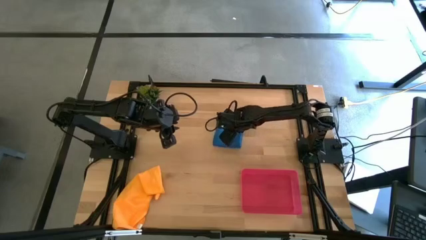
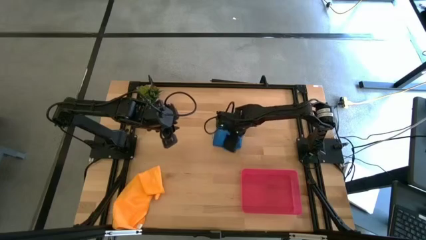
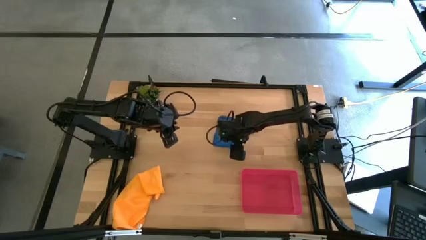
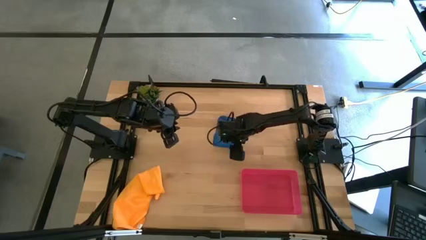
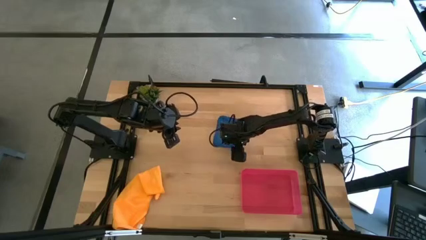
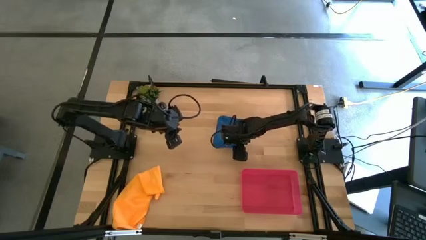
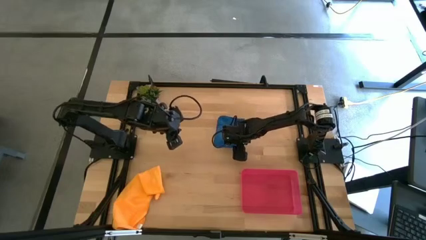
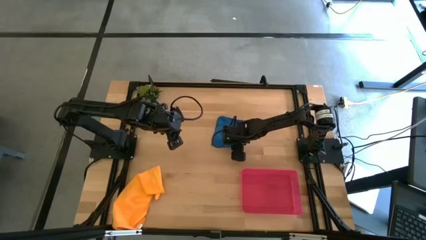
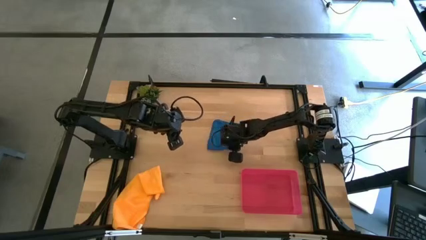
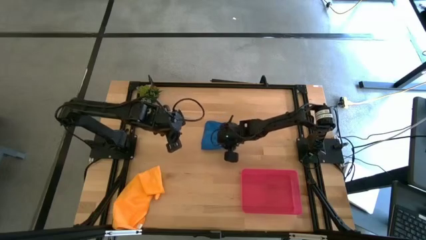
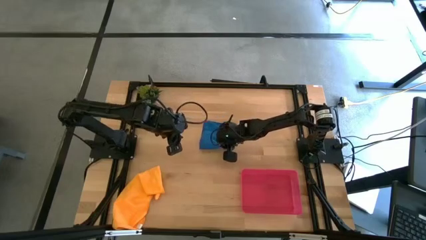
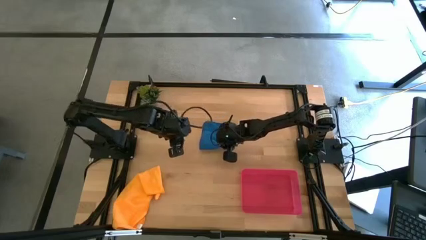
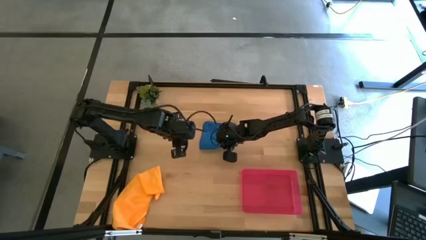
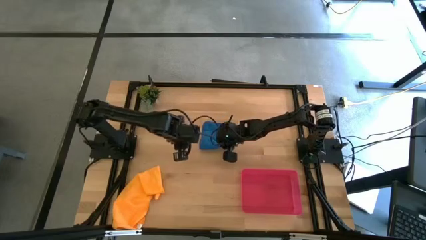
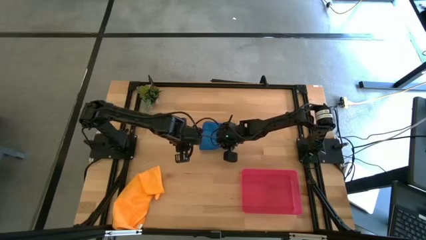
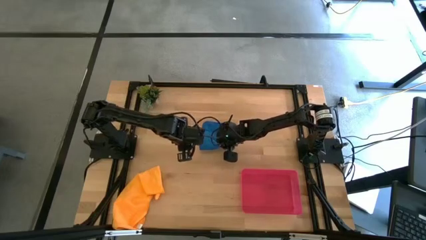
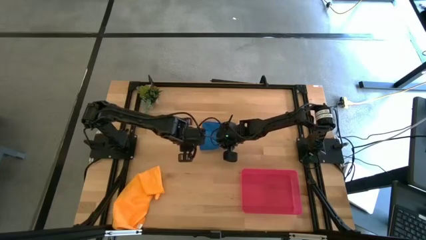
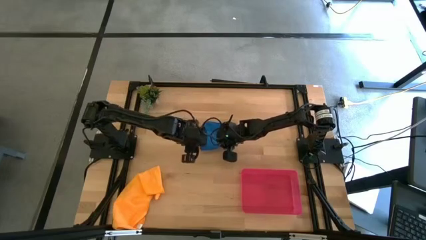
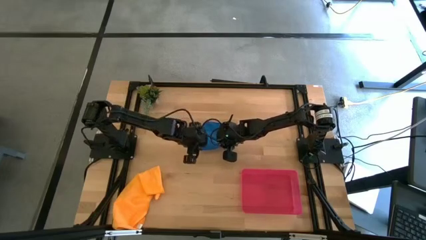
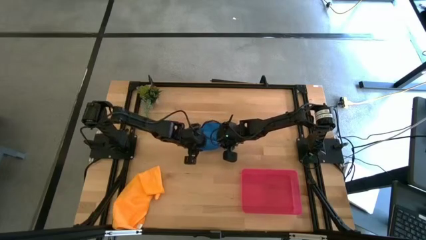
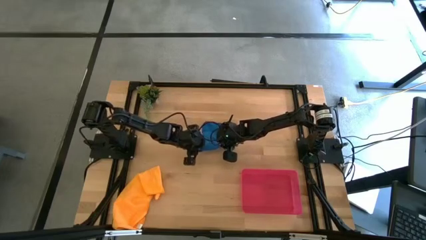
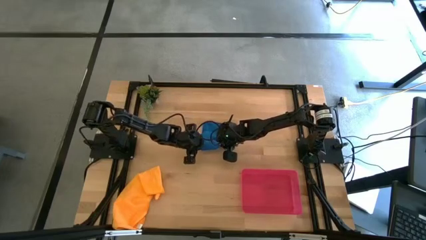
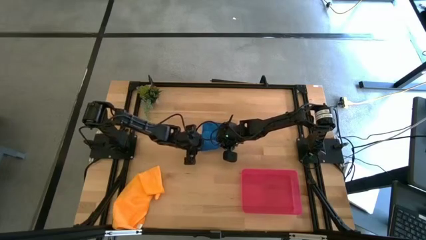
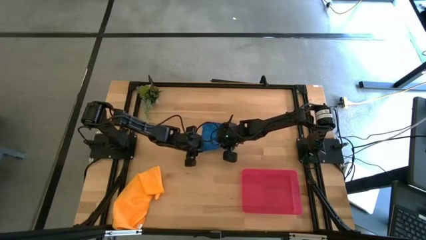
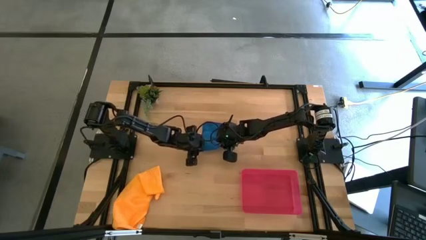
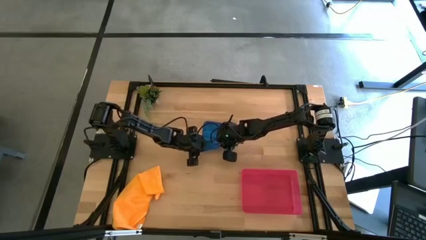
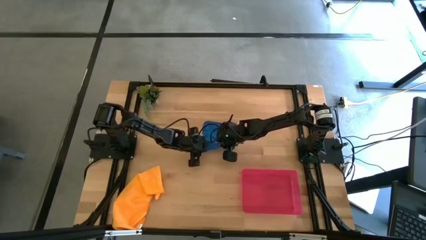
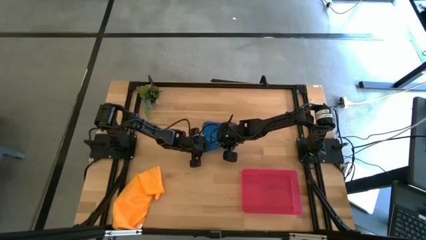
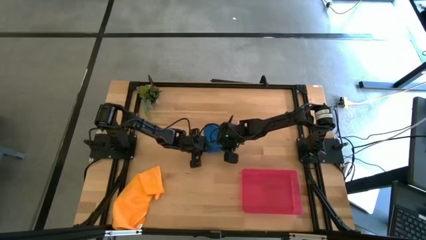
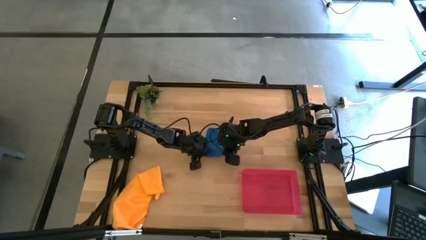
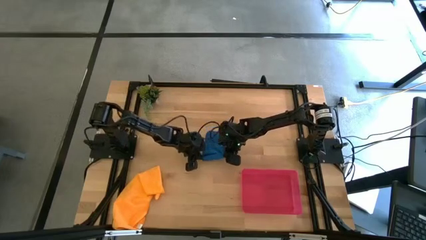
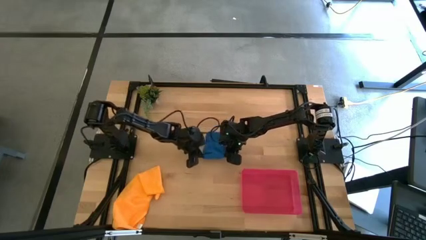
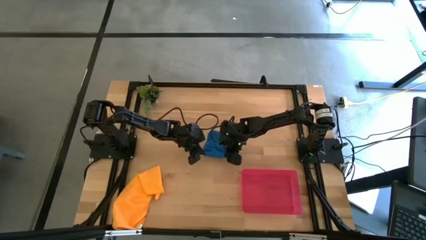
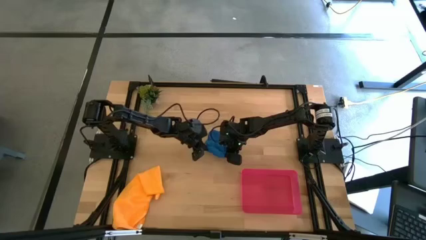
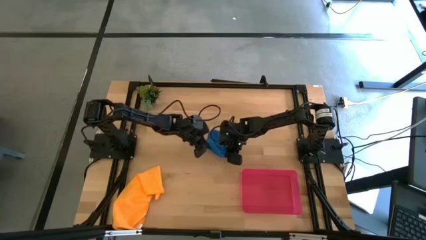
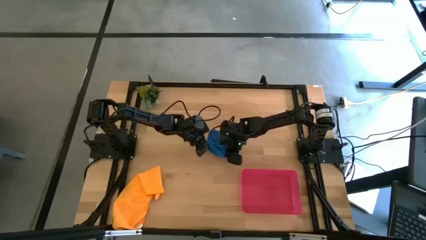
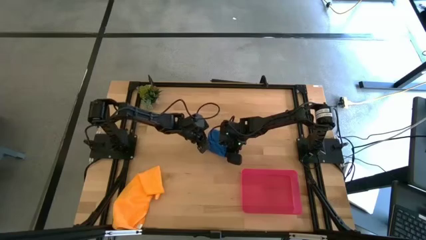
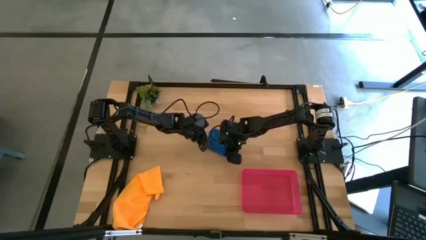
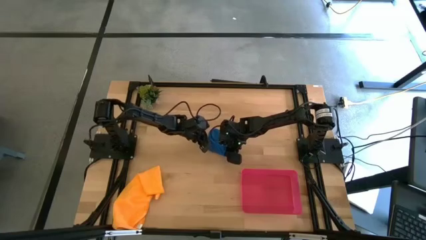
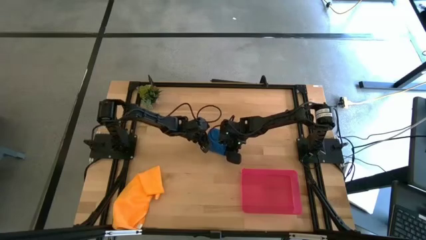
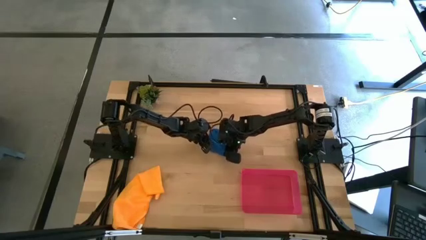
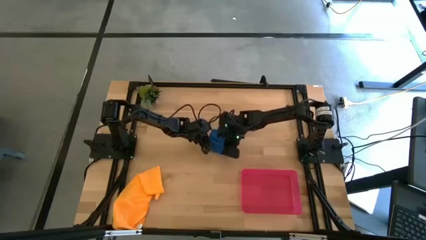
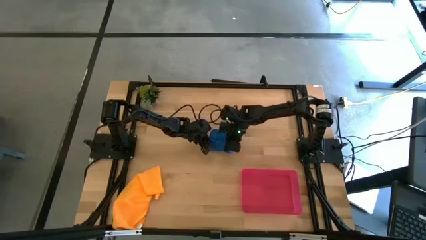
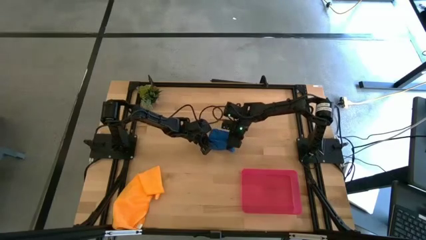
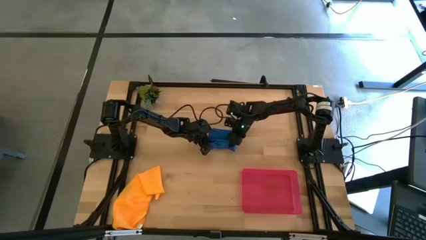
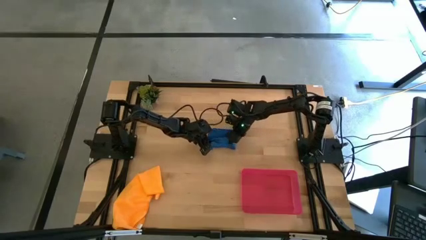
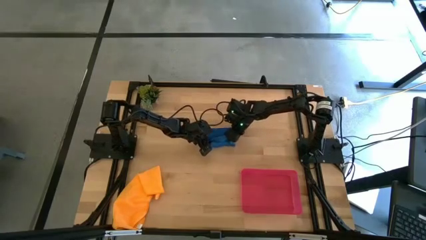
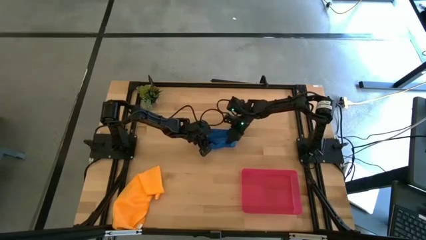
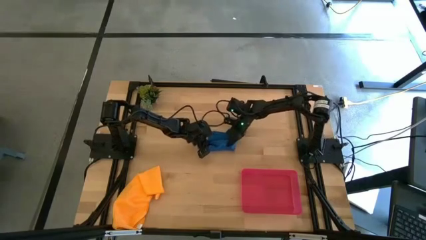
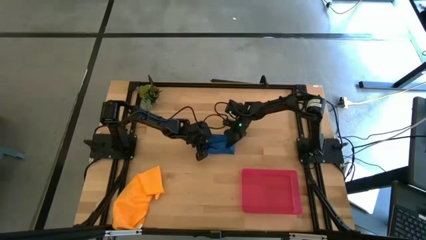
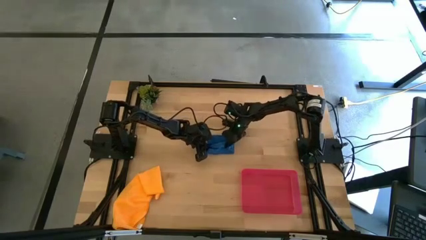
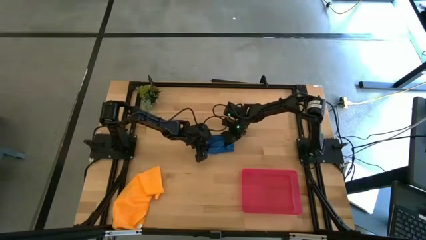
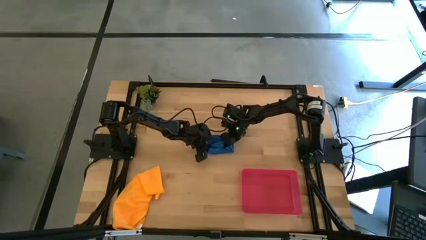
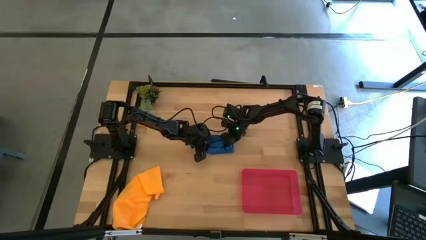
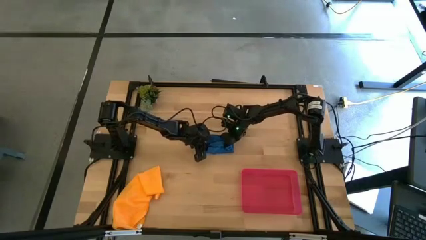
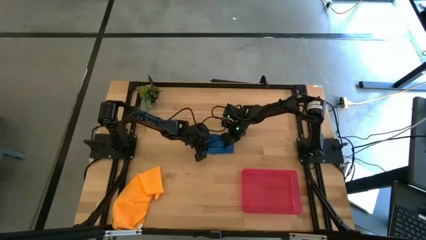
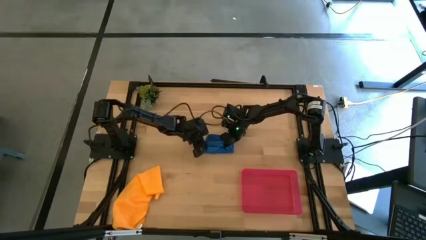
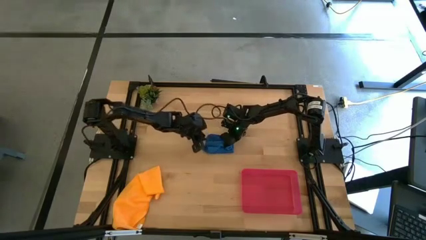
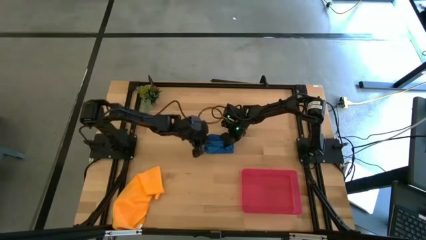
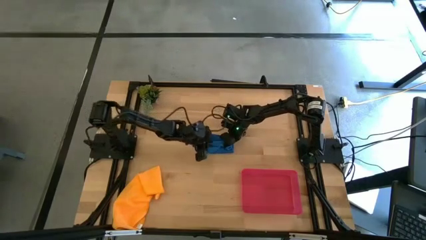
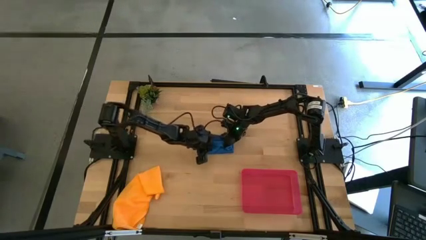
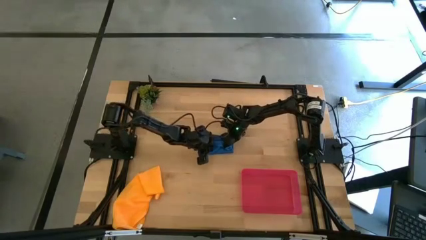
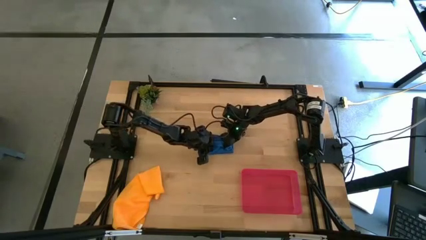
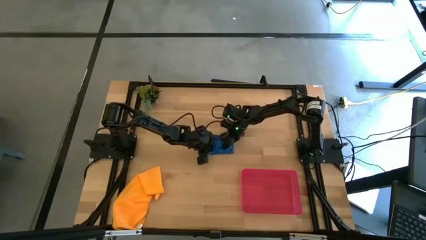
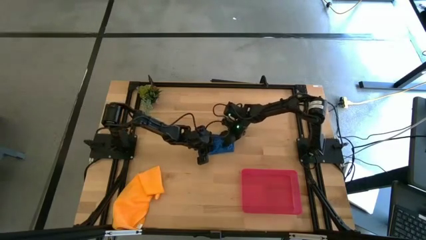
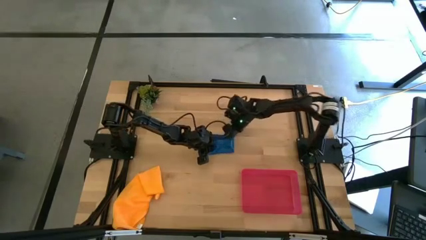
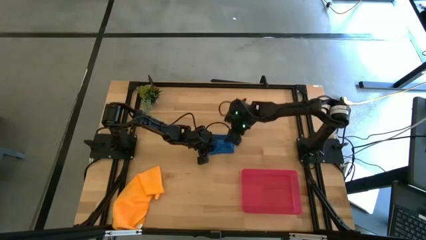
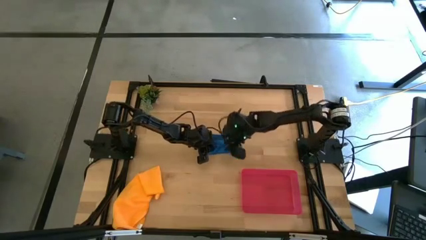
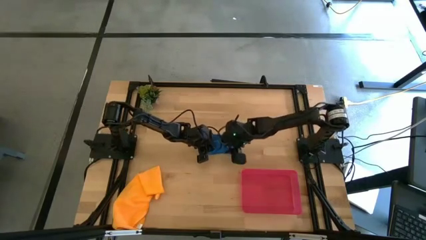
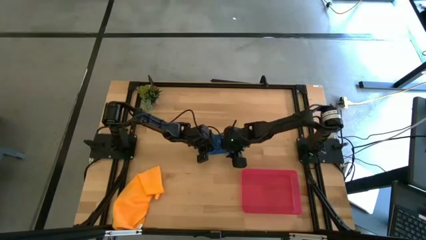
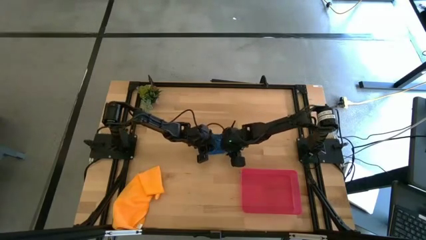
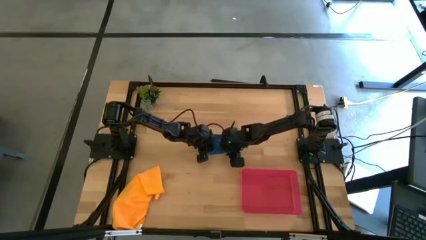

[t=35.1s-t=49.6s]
Task: Roll microfiber towels into tight, uniform cylinder then place into a basket
Roll the blue microfiber towel

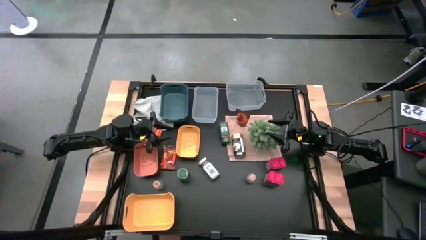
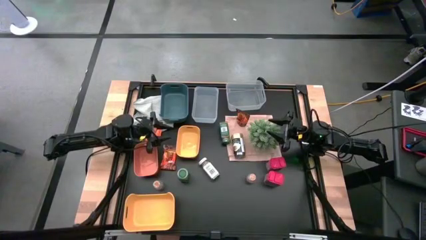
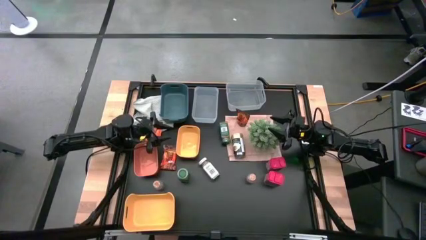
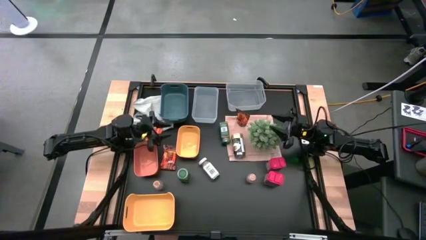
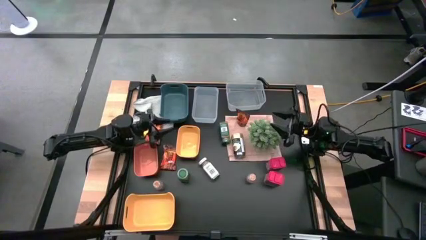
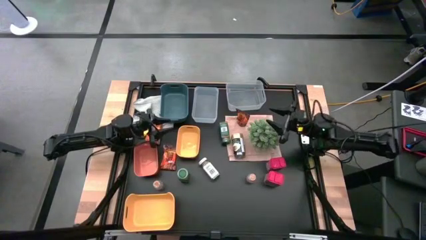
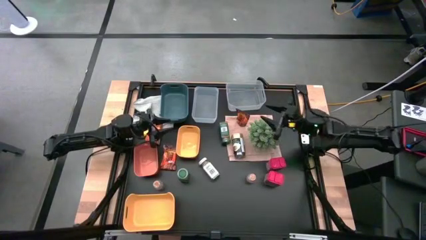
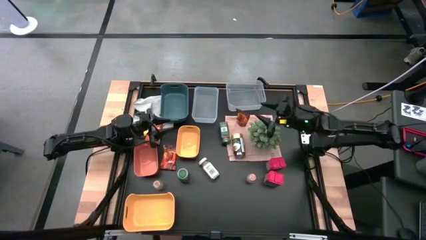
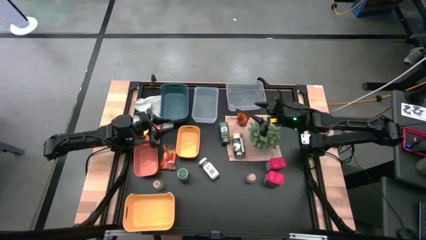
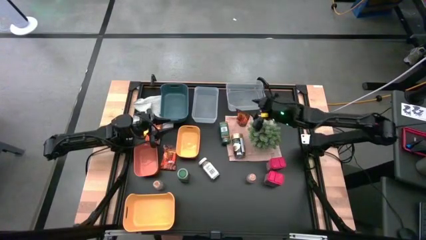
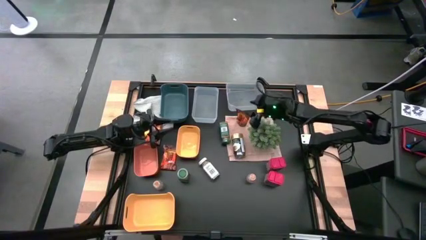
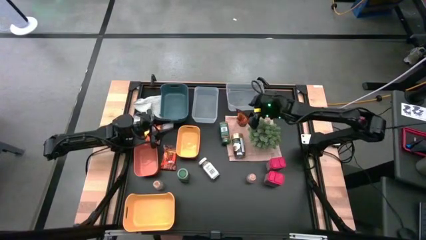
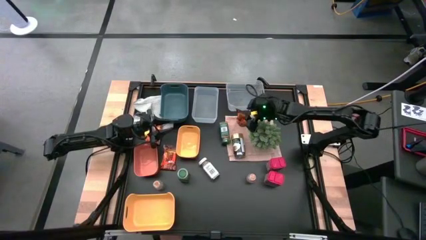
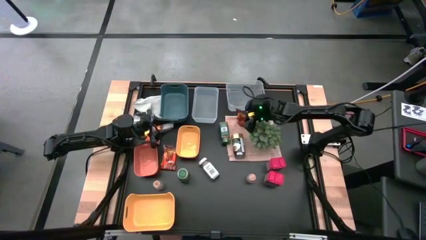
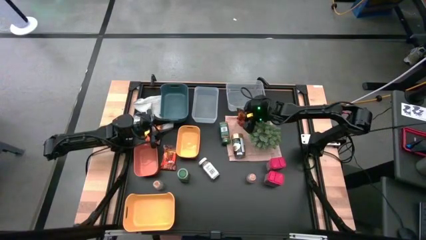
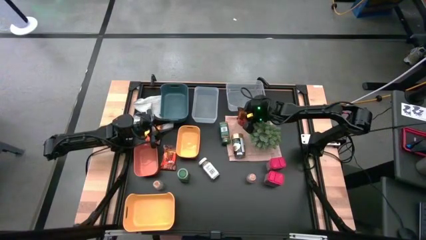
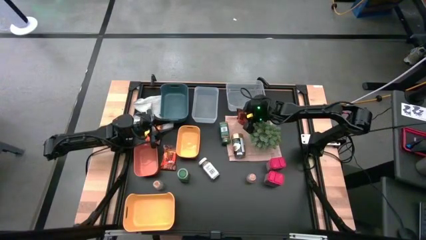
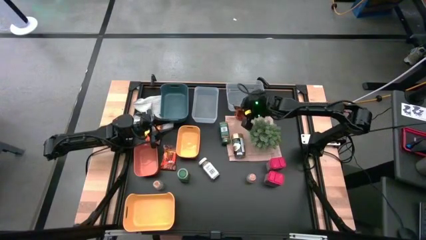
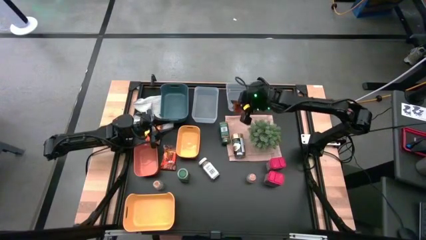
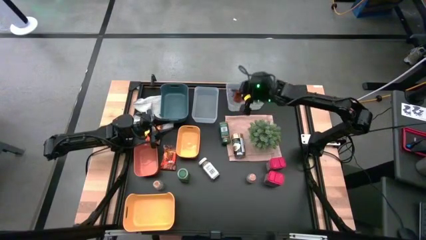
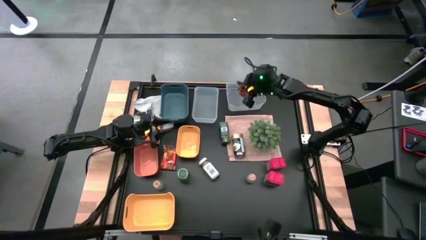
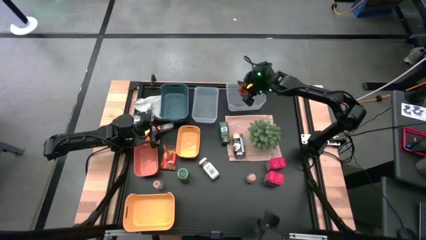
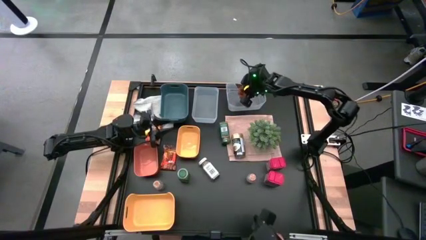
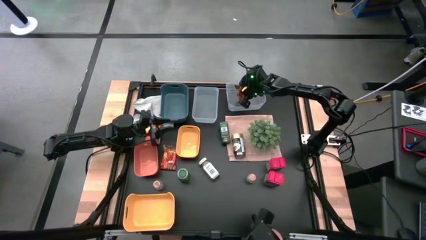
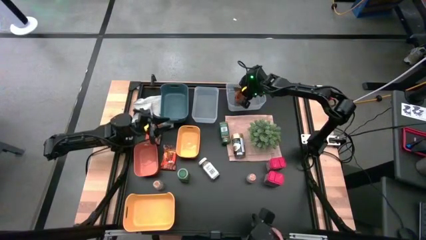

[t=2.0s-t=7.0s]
Task: Sort spices by type
Put the right orange seasoning pack into the right transparent bin
